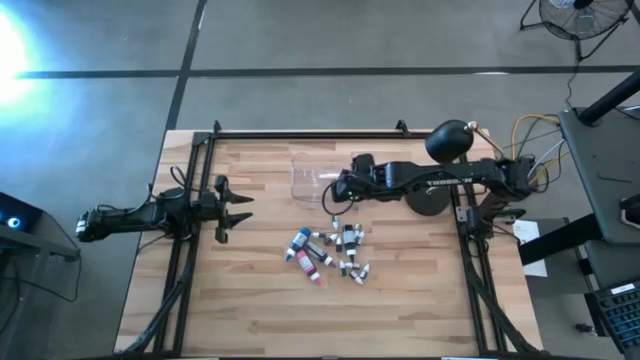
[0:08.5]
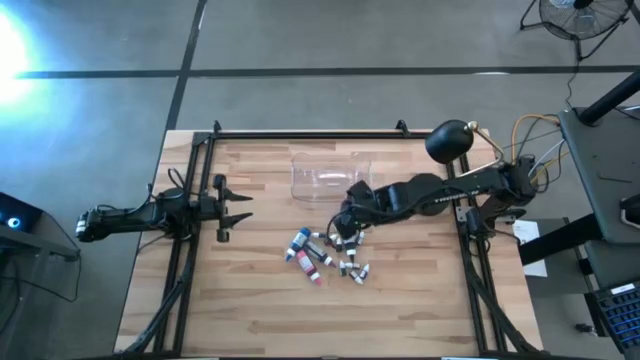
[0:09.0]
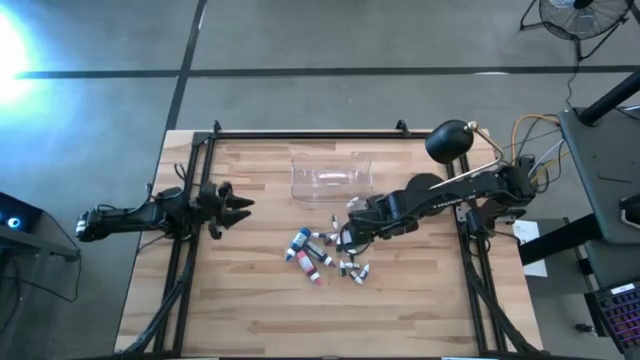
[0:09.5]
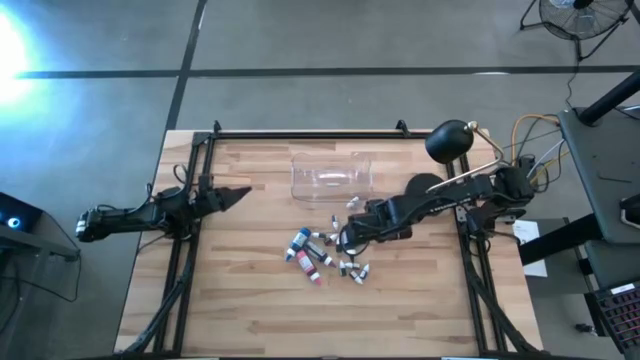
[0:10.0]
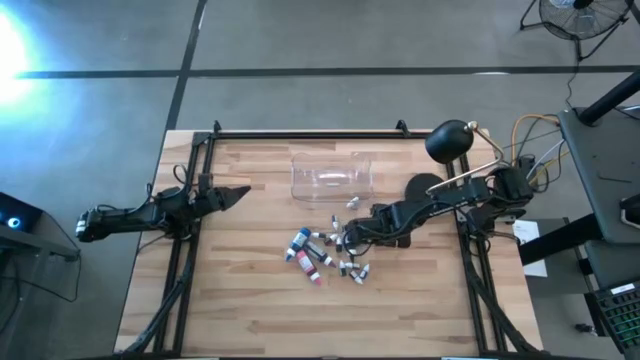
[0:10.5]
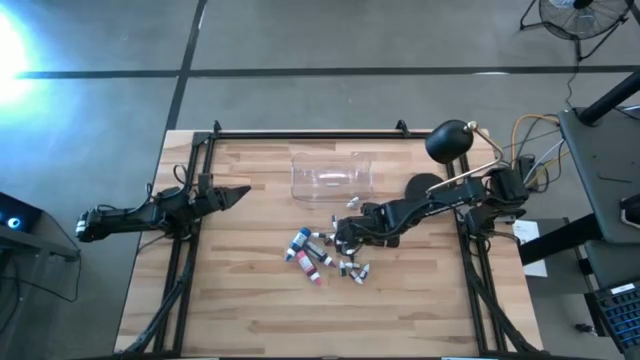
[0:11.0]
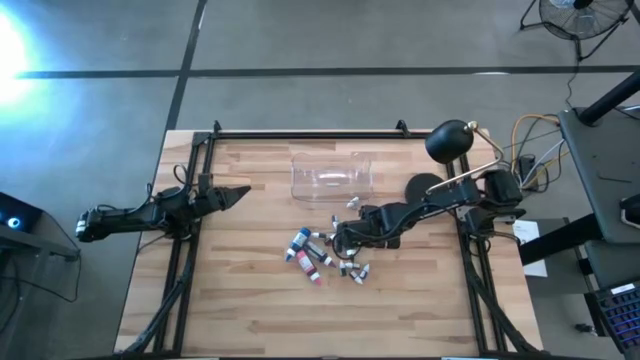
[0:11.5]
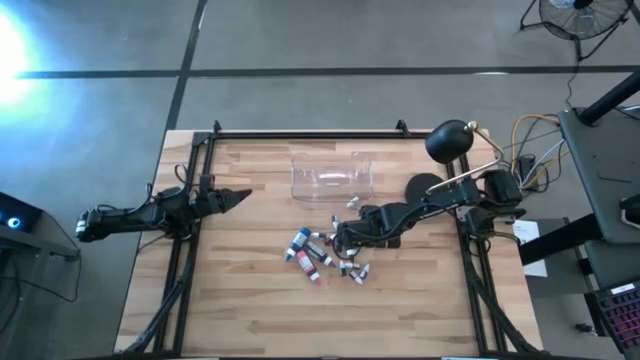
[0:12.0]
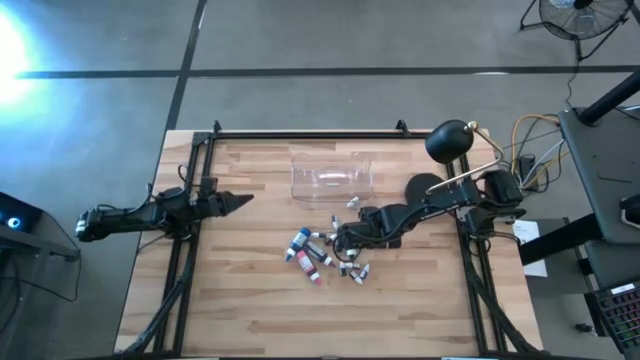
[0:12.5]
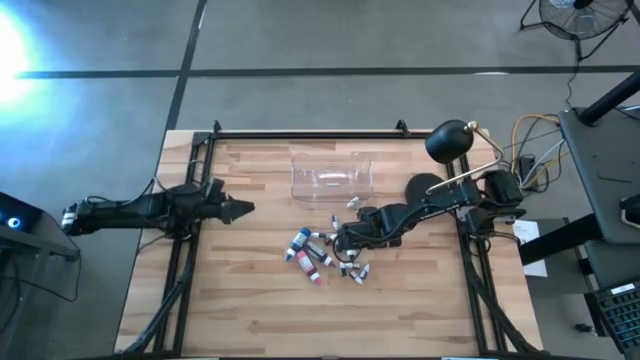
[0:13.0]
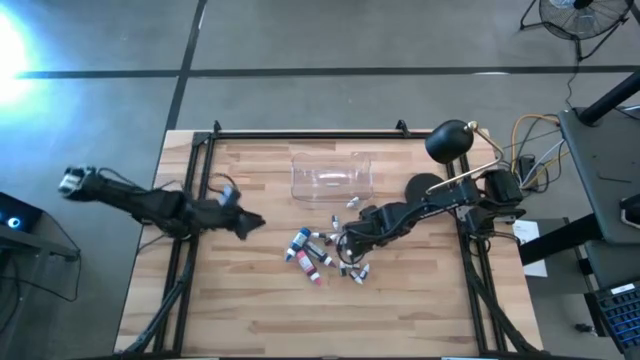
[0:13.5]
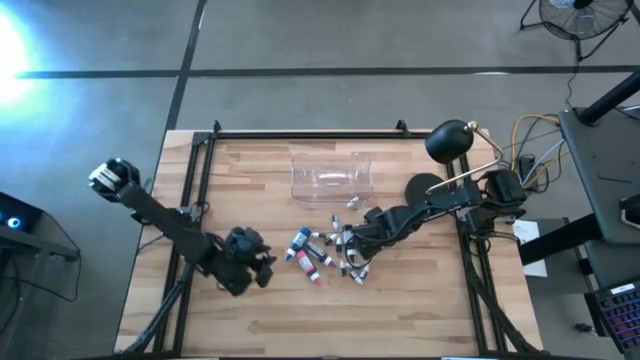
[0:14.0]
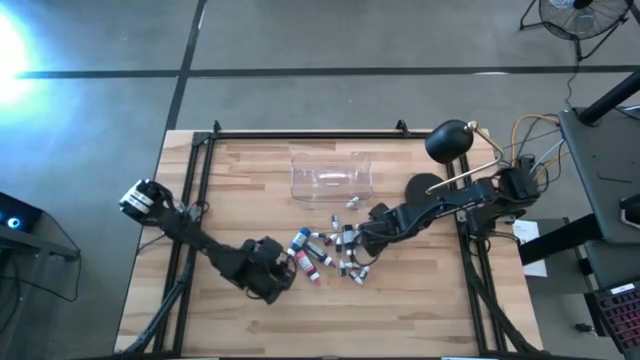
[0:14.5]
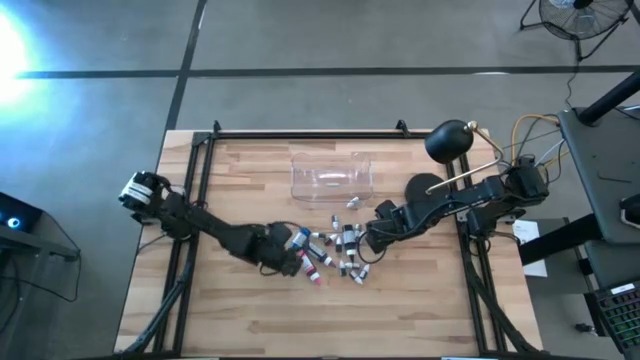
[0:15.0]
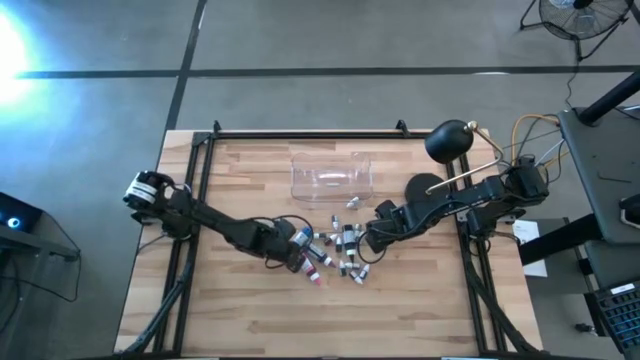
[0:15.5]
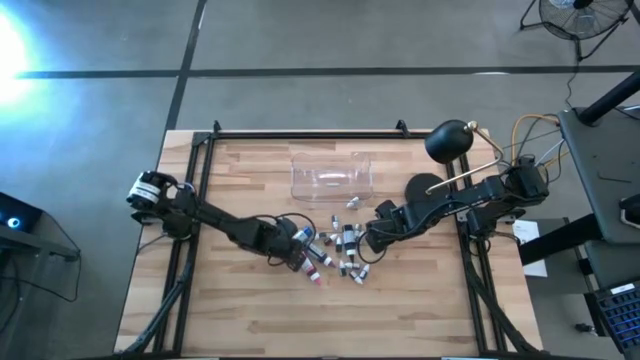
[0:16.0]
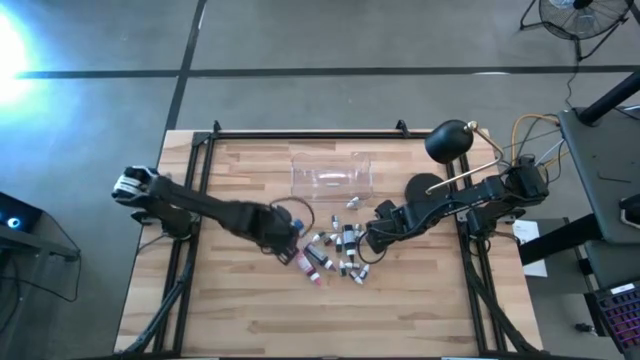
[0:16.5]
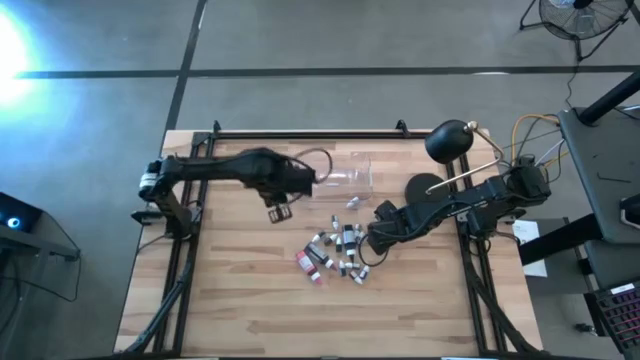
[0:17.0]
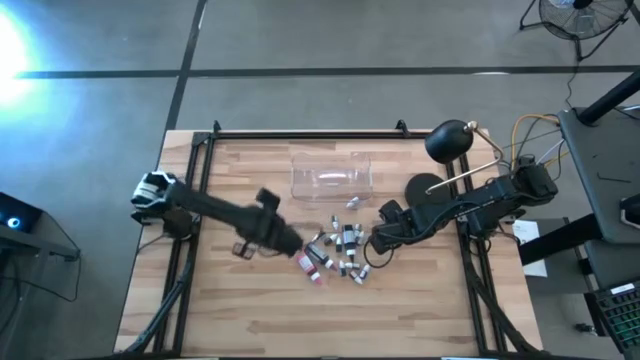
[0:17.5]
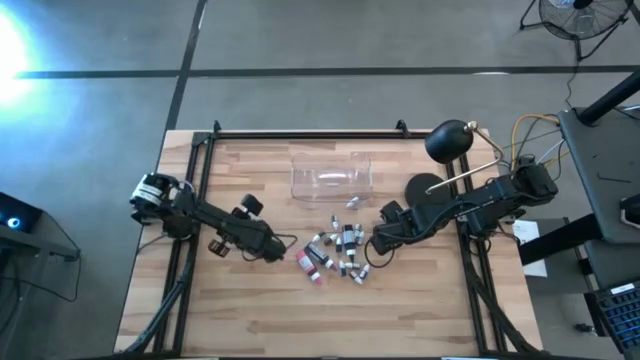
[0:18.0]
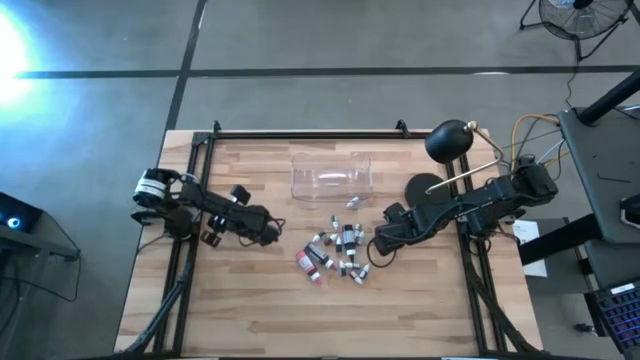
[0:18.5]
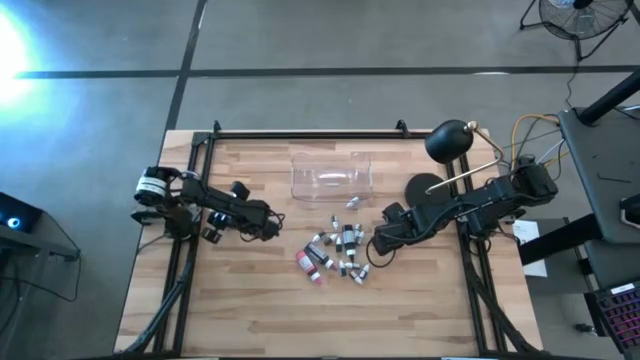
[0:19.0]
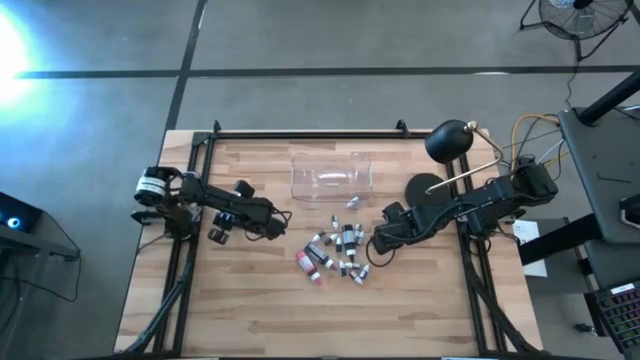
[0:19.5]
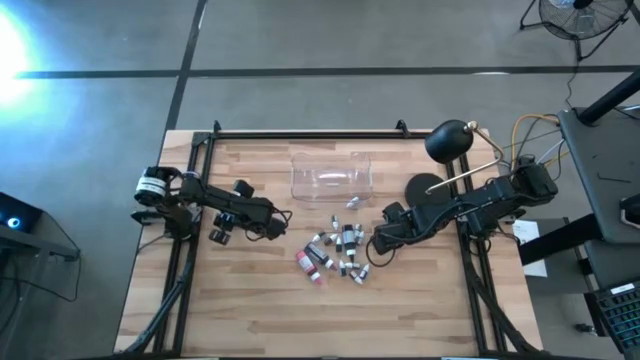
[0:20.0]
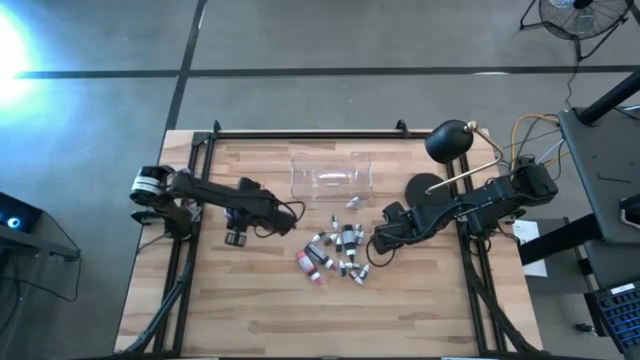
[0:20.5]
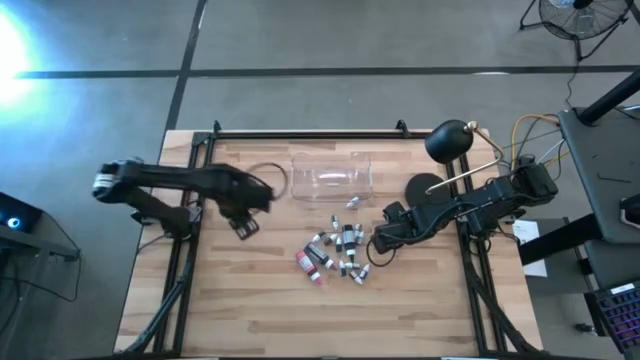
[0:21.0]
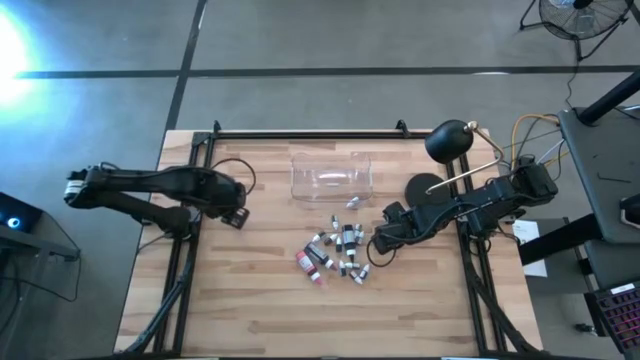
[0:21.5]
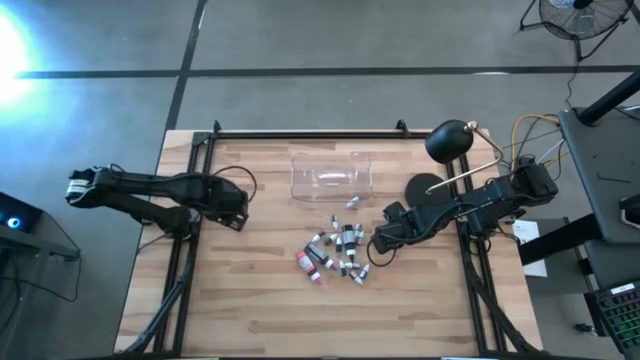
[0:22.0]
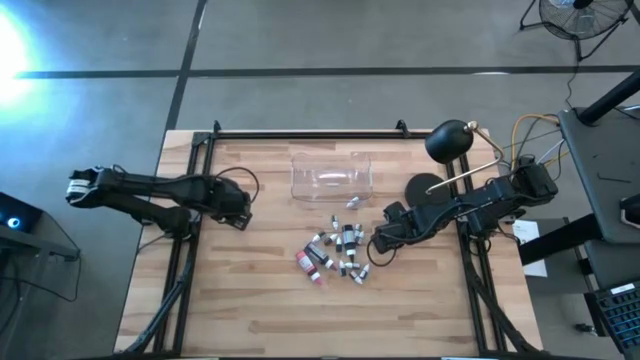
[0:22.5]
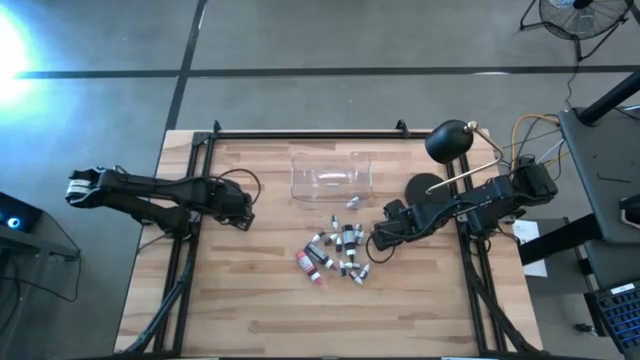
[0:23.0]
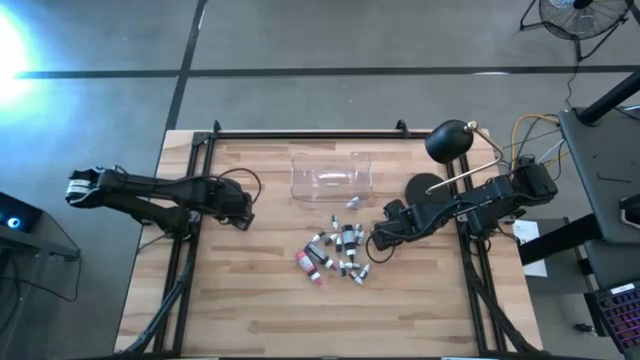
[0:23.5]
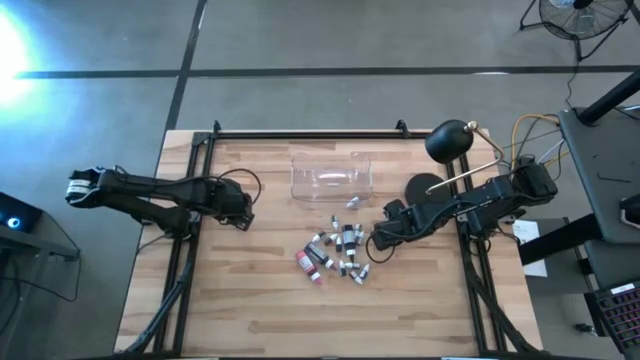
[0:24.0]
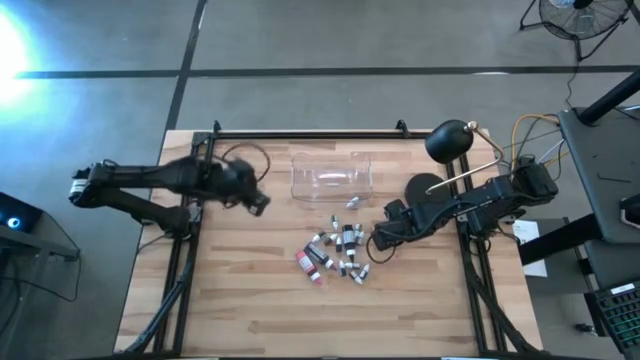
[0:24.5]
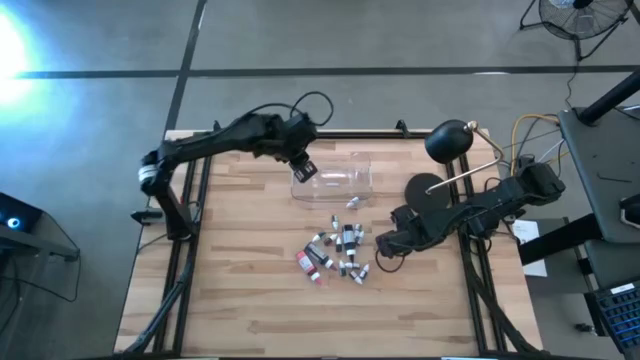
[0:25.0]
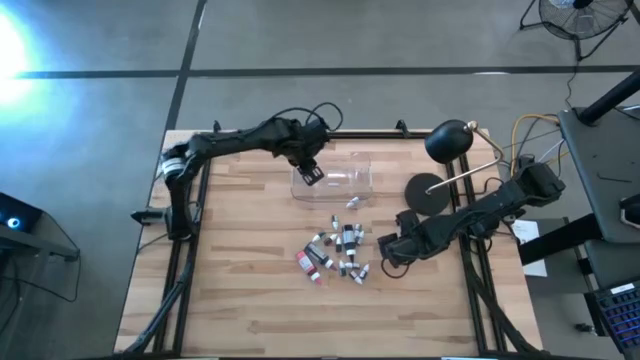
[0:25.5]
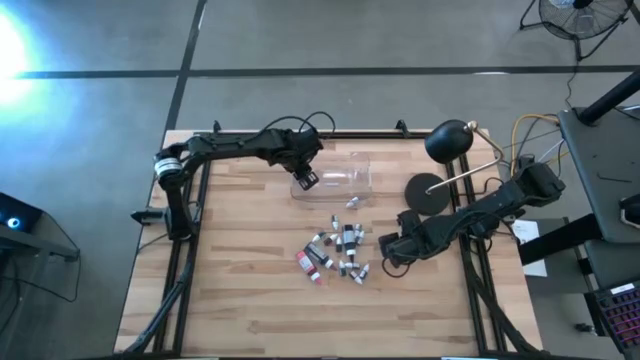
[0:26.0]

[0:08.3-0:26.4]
Task: Pick & Place food coloring
Put the large blue food coloring bottle into the transparent bin
